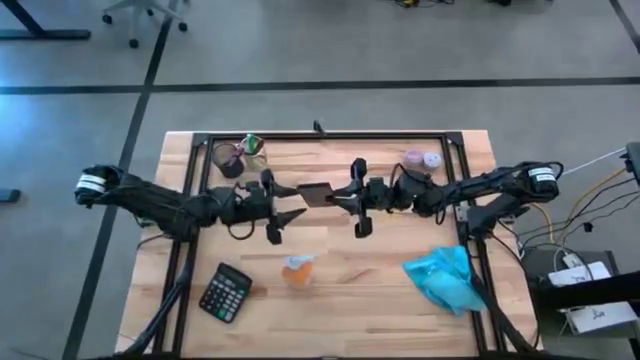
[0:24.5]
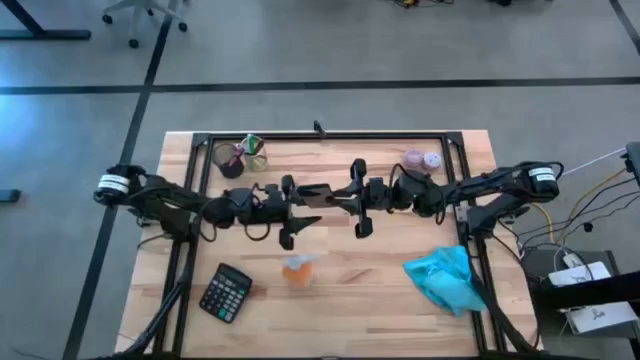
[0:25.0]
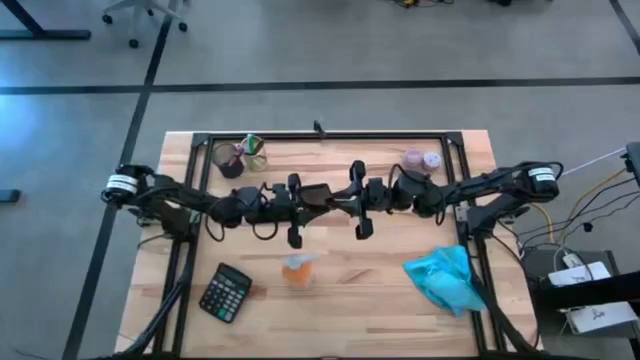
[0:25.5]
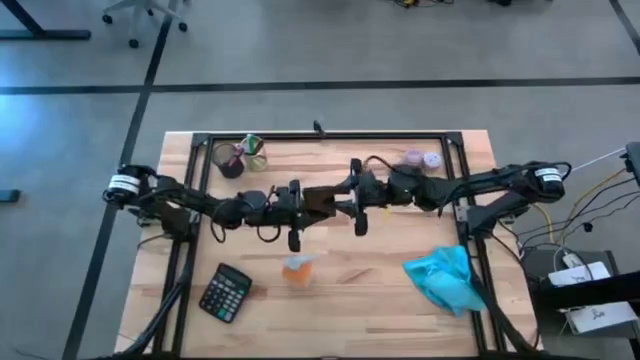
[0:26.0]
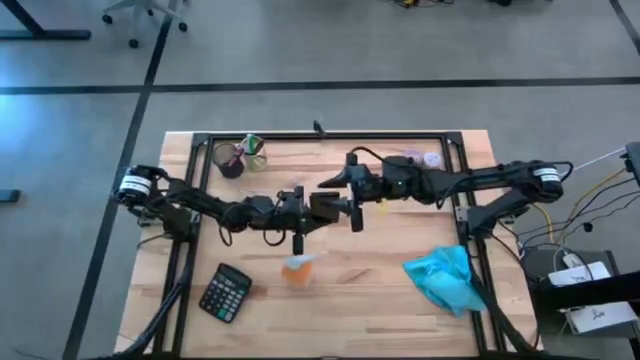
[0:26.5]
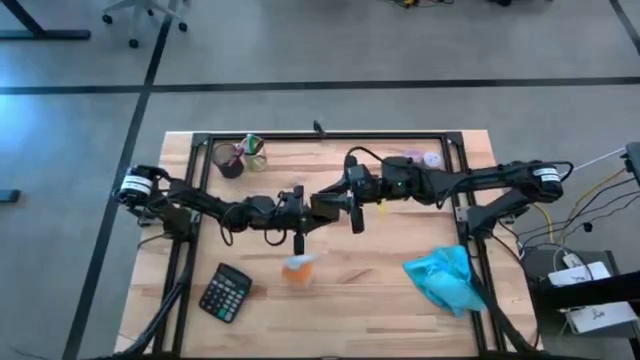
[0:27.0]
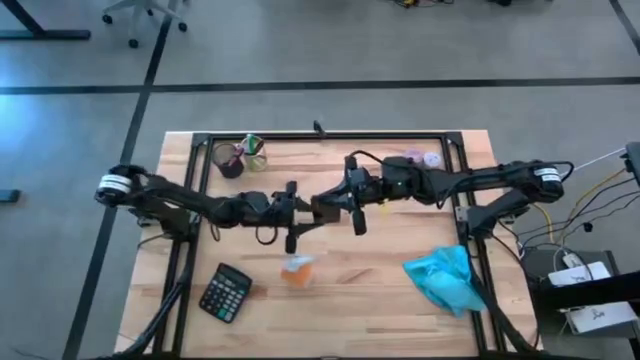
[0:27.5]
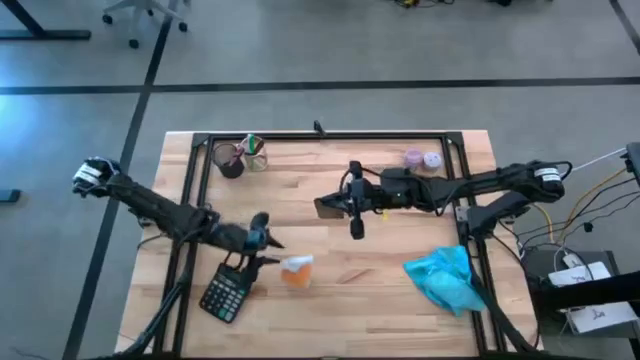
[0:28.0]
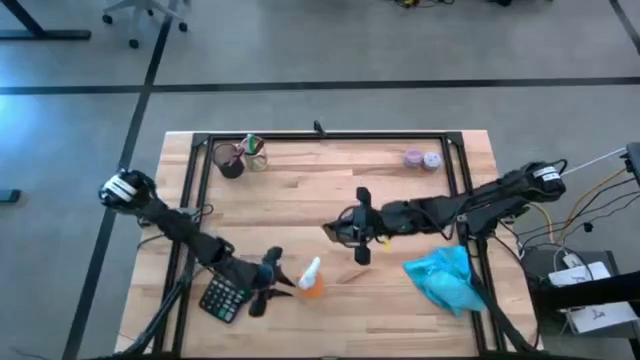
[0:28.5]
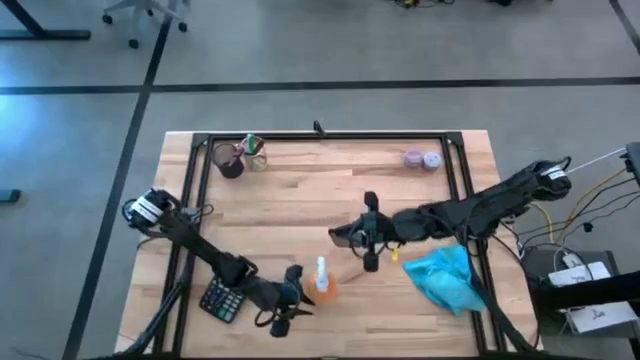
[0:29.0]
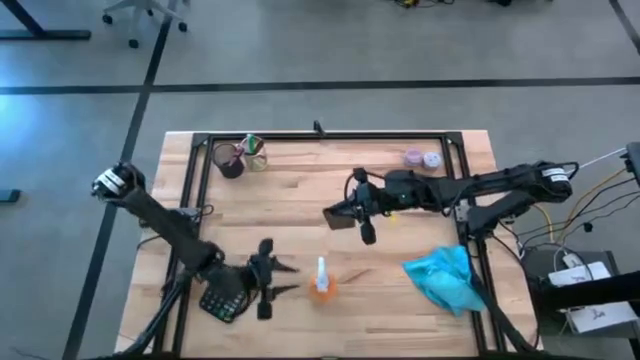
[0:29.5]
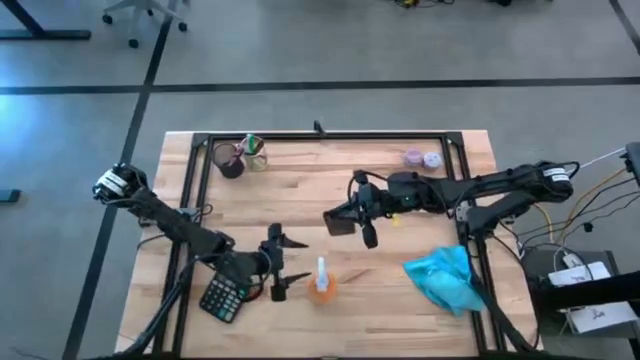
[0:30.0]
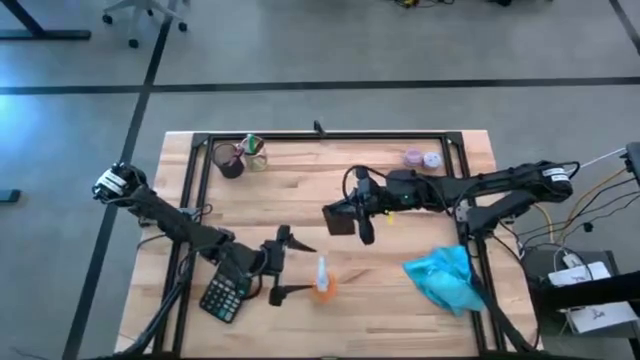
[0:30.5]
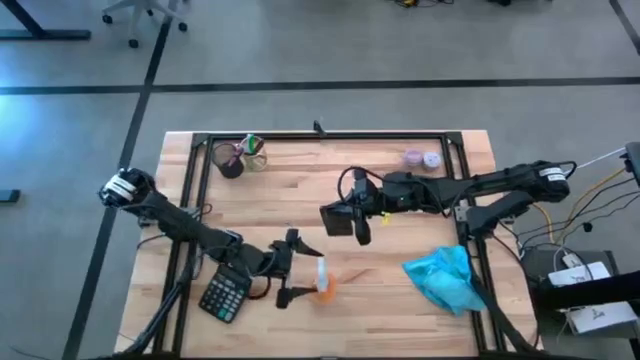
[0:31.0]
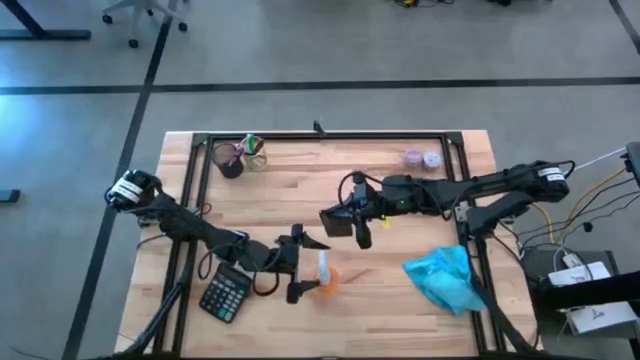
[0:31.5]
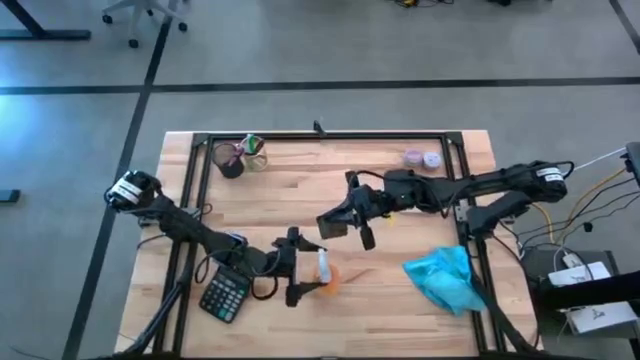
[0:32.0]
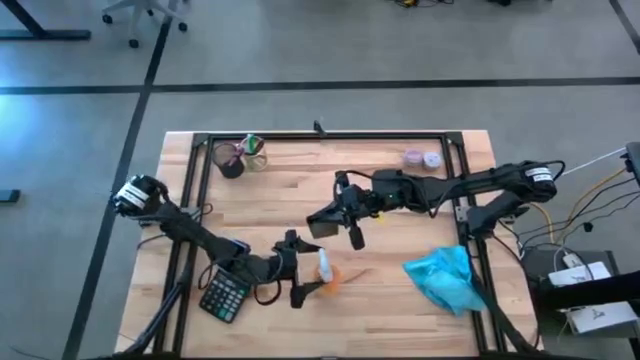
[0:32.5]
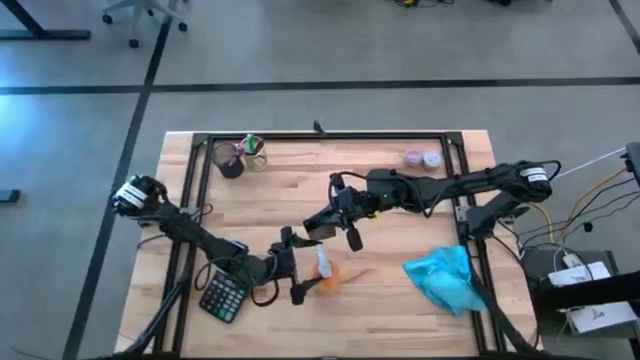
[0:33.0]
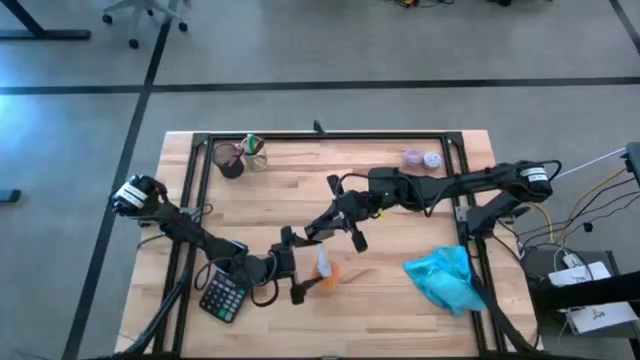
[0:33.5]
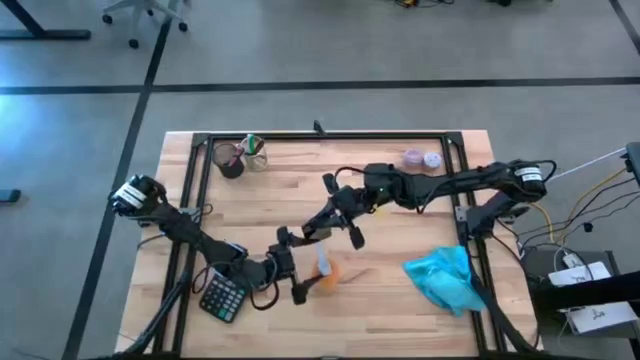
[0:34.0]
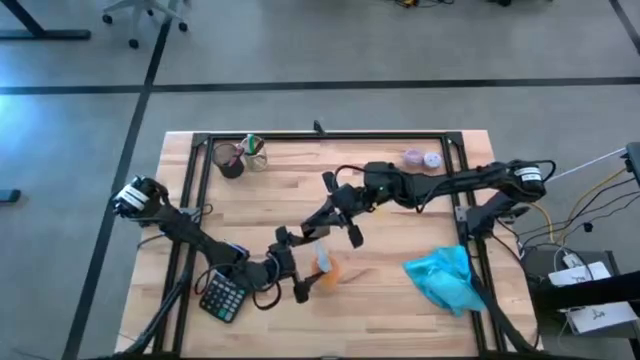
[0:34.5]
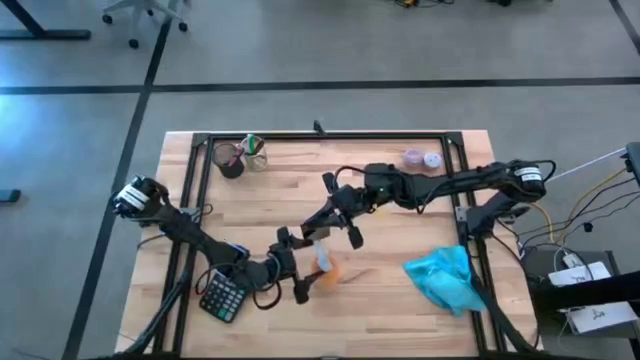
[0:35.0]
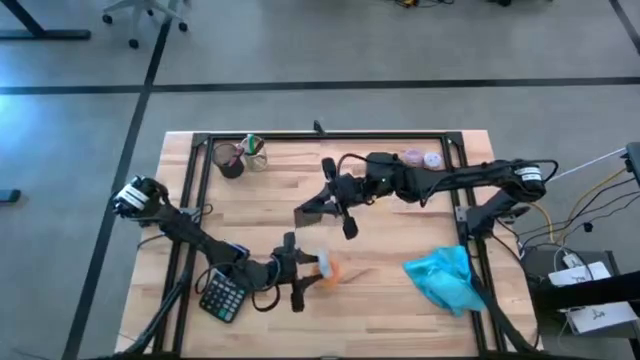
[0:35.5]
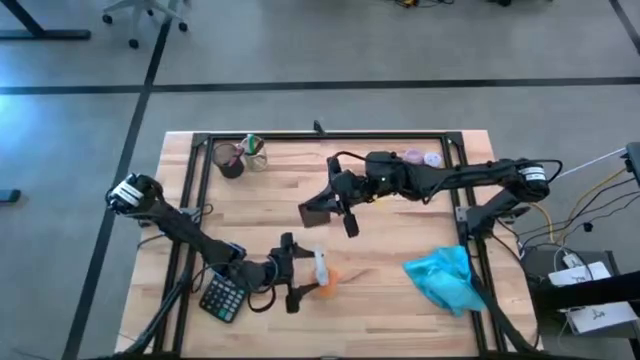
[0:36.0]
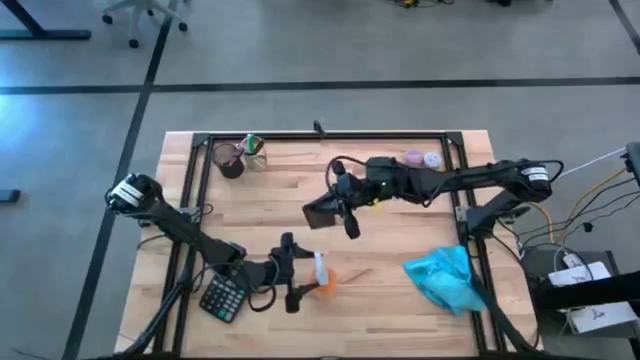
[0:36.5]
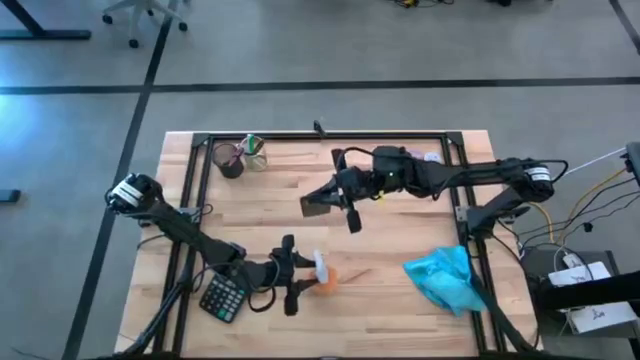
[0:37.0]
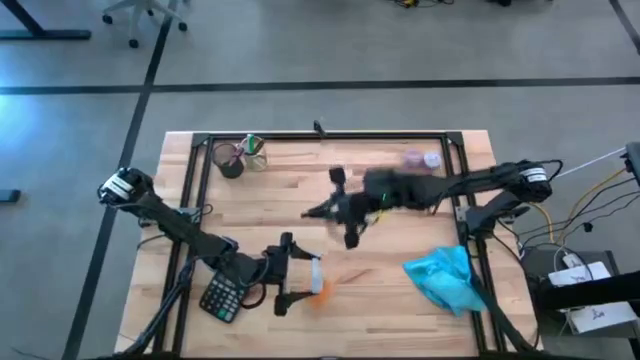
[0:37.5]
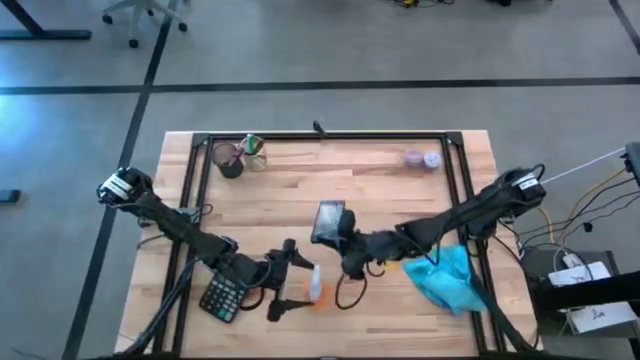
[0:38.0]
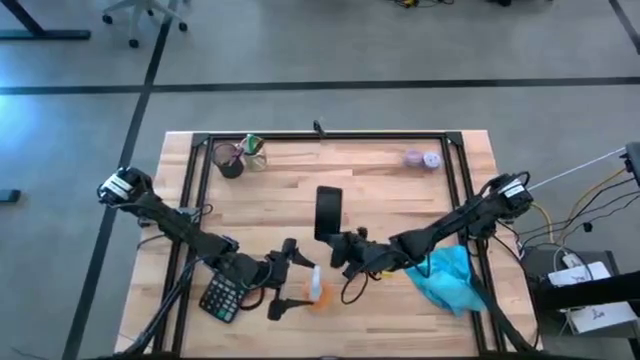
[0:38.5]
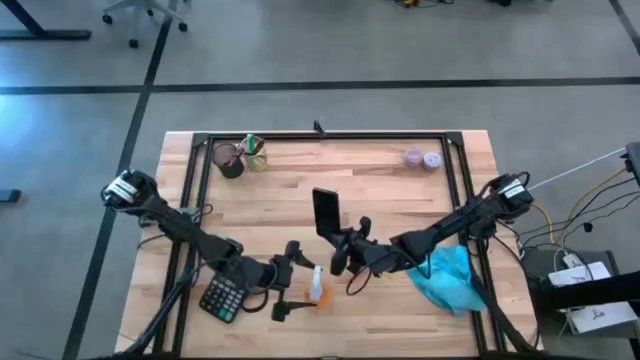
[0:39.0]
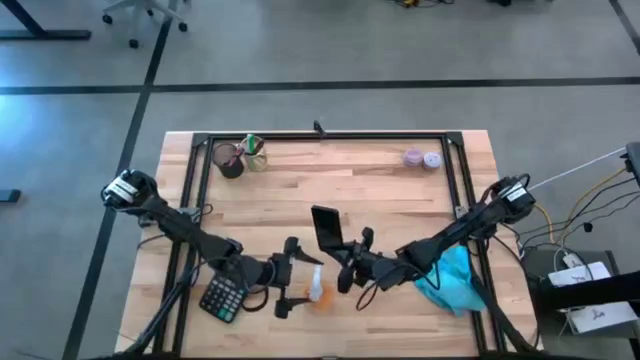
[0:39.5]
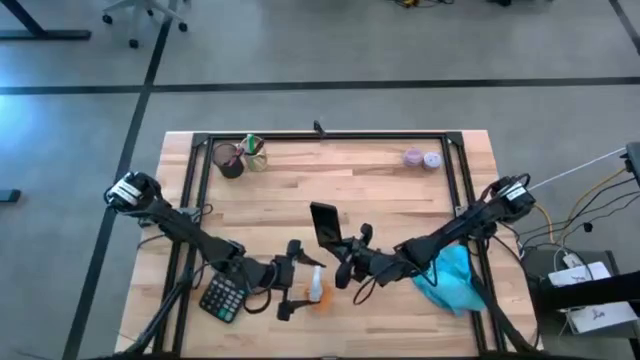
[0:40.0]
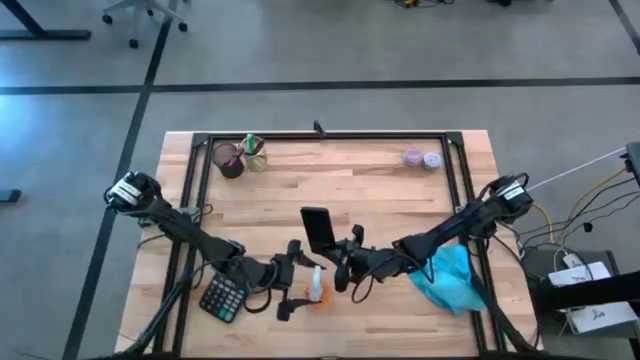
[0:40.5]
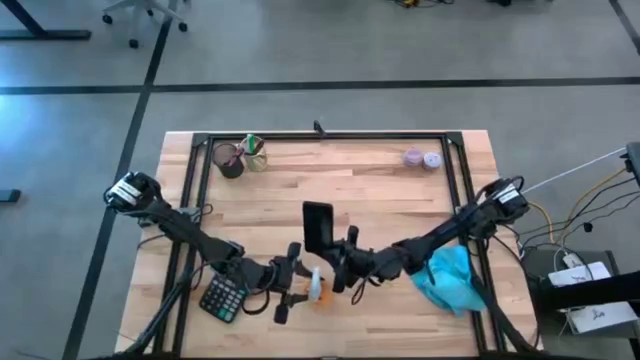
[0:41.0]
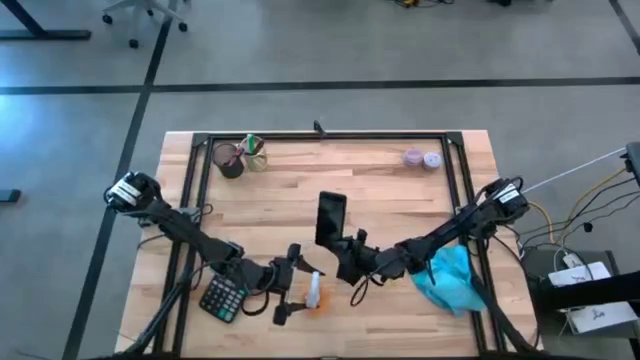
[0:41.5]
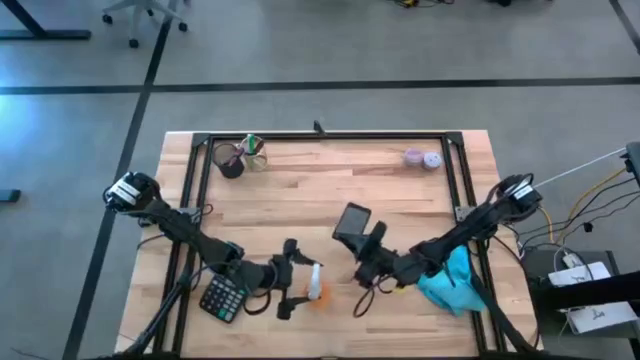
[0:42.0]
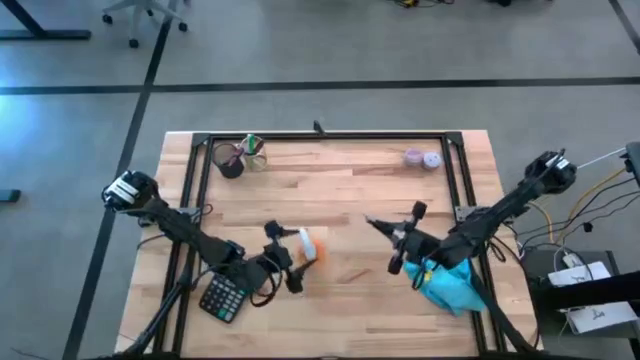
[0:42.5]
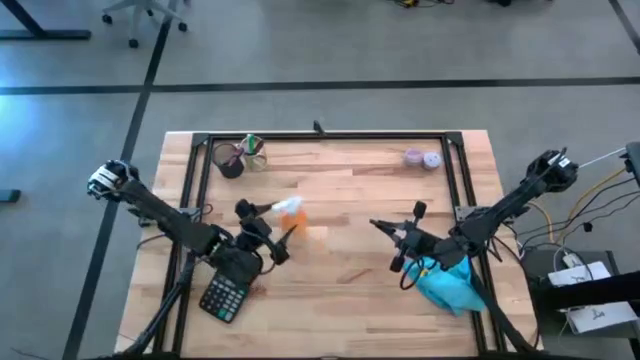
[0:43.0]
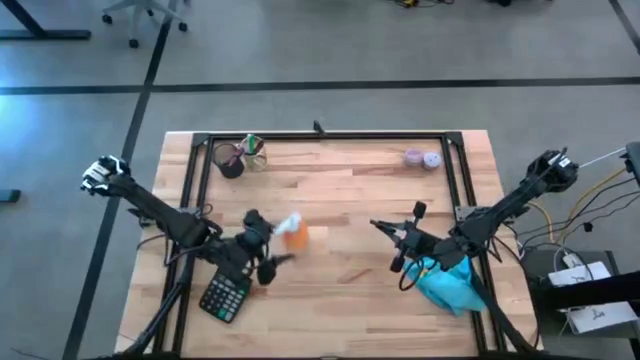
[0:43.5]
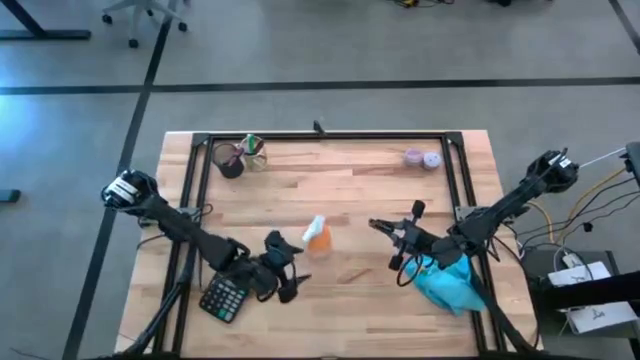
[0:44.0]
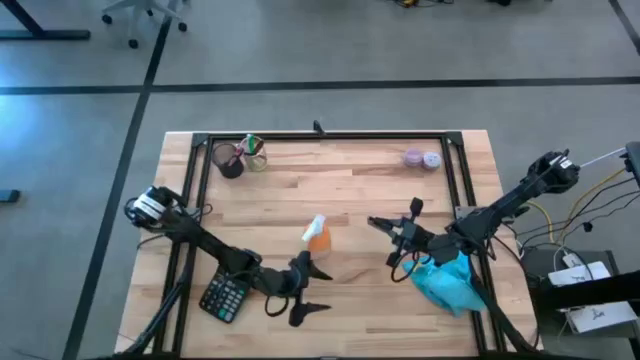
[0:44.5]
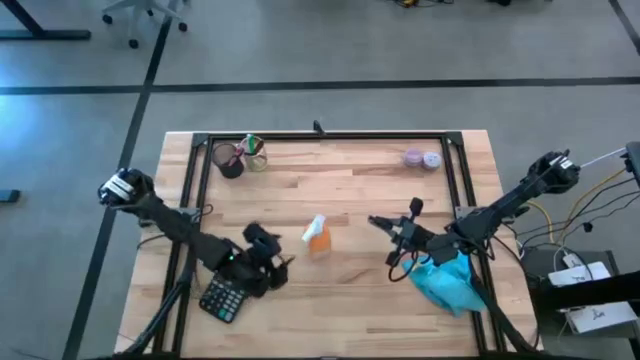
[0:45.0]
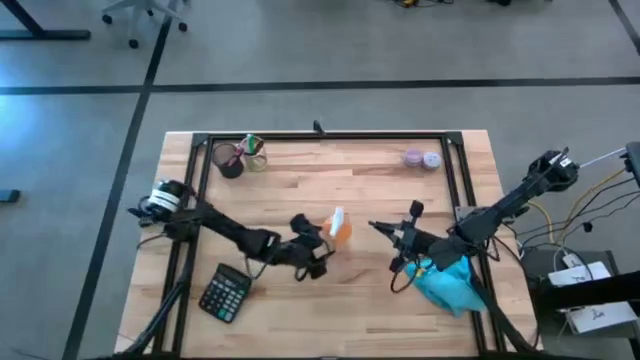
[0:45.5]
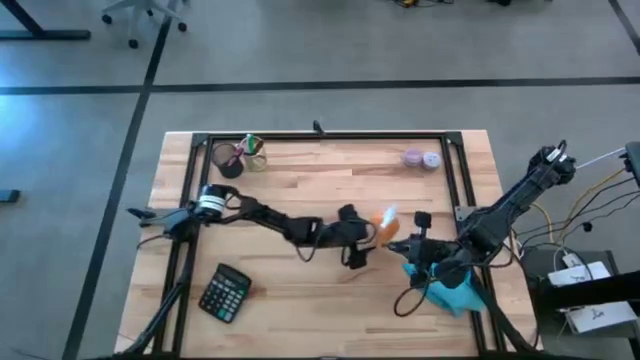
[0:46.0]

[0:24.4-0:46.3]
Task: Apply microfiber cloth
Spray the cellphone with the orange spray bottle
